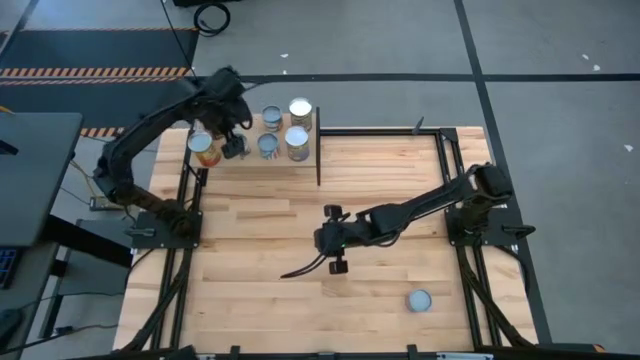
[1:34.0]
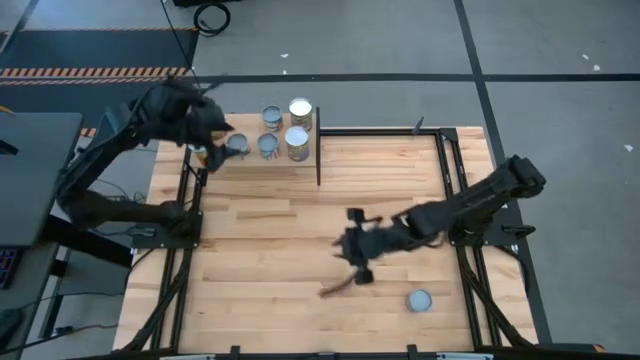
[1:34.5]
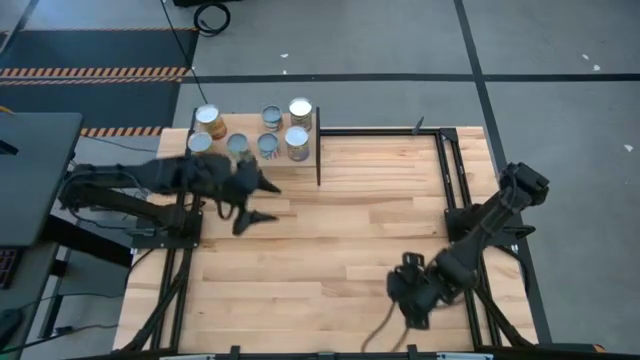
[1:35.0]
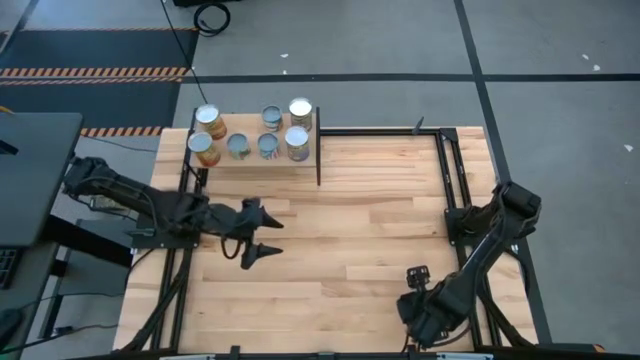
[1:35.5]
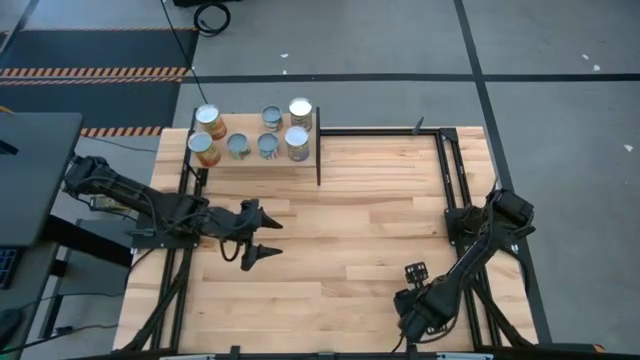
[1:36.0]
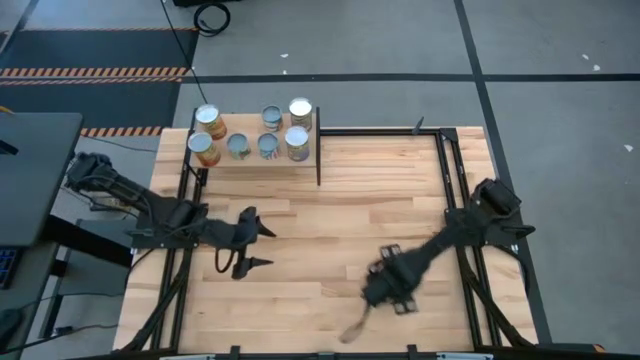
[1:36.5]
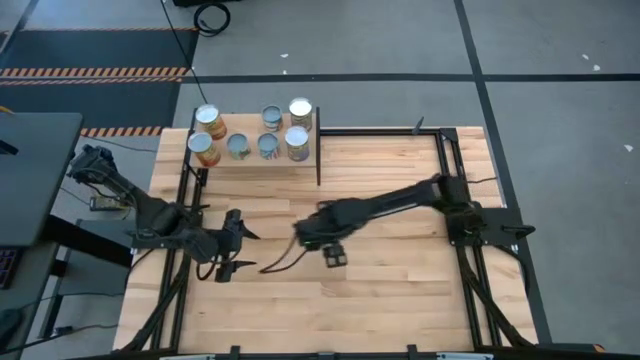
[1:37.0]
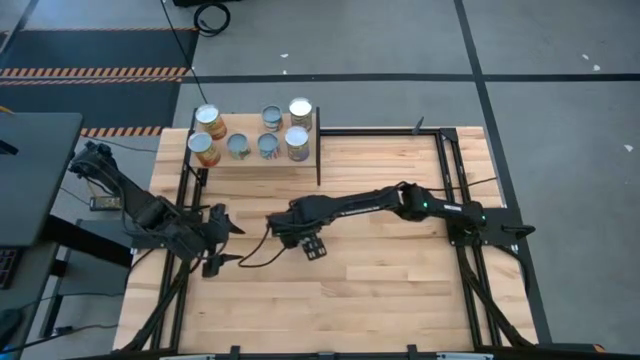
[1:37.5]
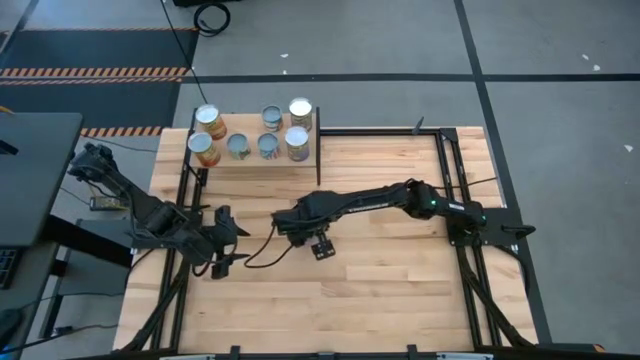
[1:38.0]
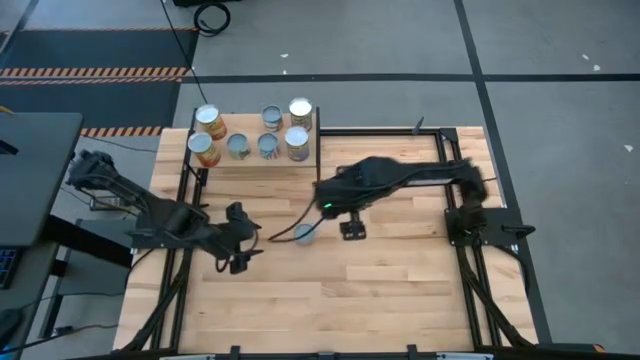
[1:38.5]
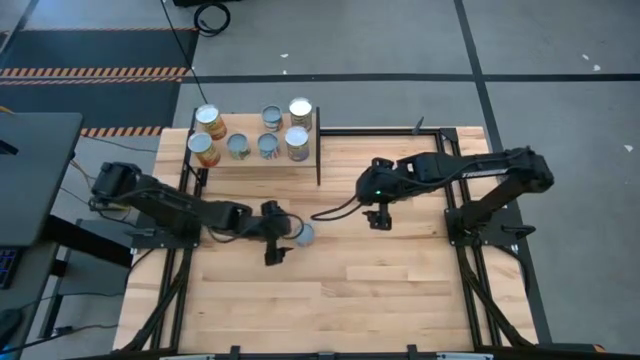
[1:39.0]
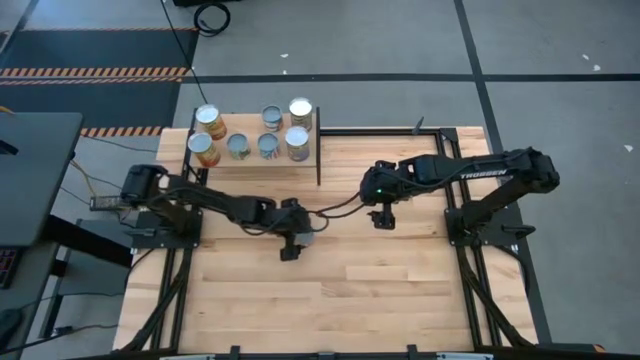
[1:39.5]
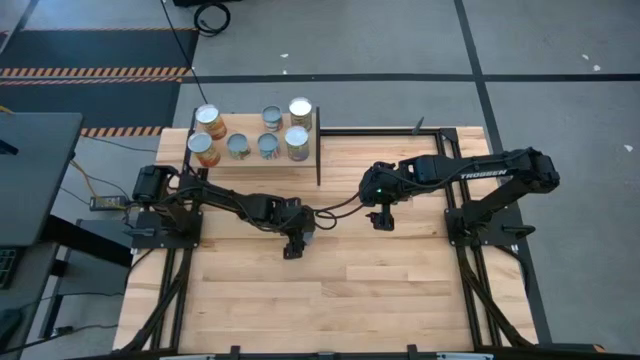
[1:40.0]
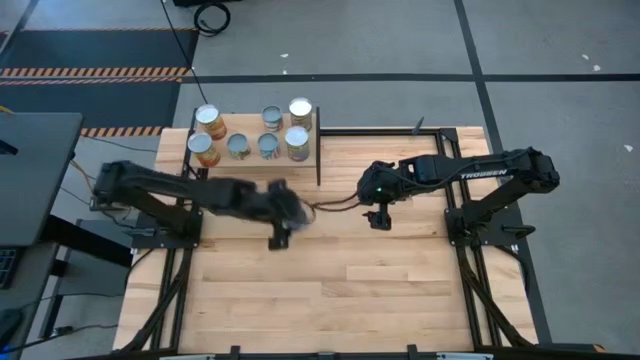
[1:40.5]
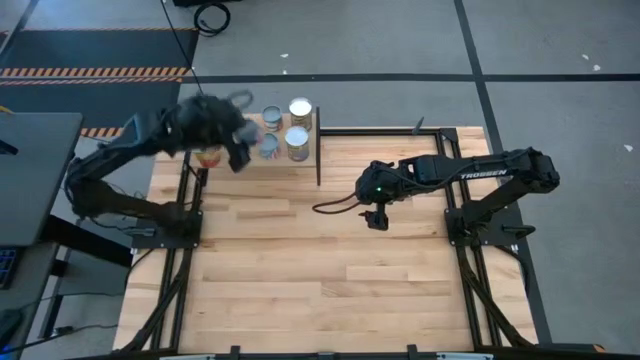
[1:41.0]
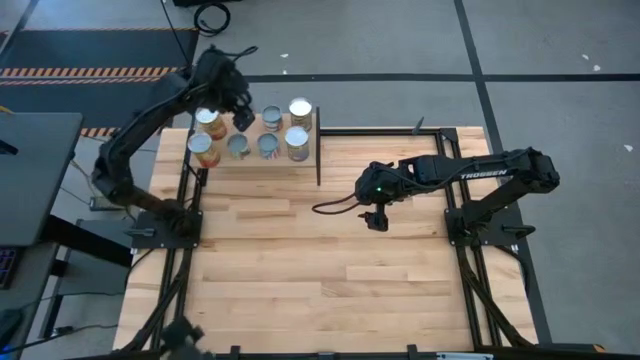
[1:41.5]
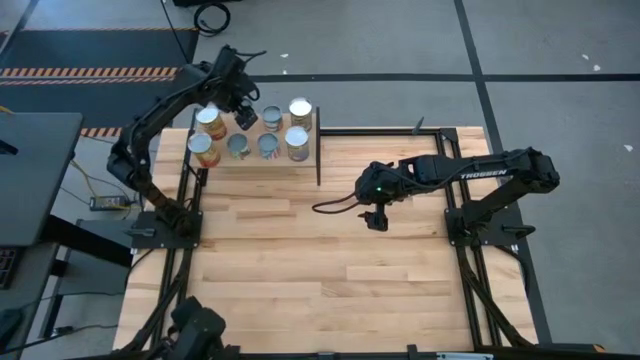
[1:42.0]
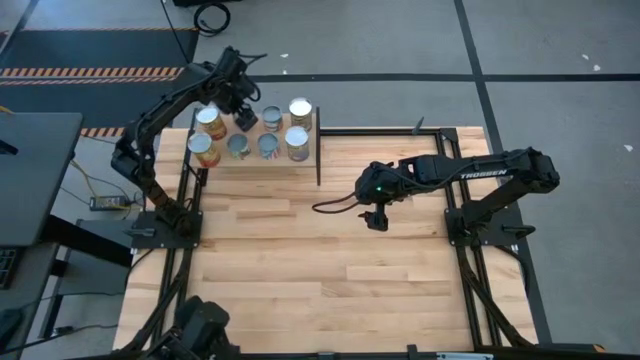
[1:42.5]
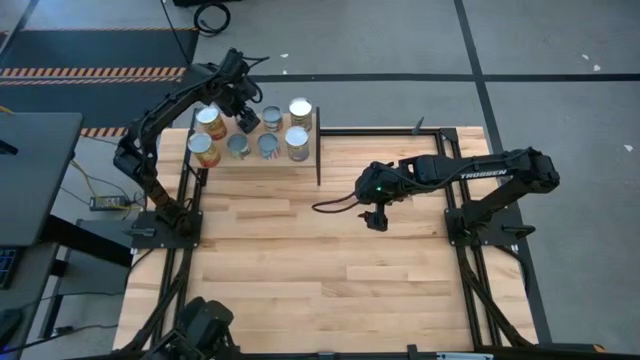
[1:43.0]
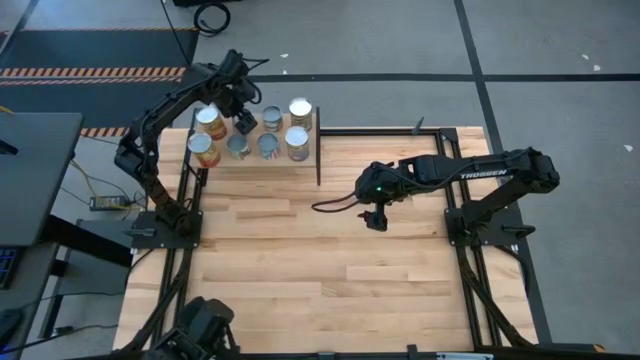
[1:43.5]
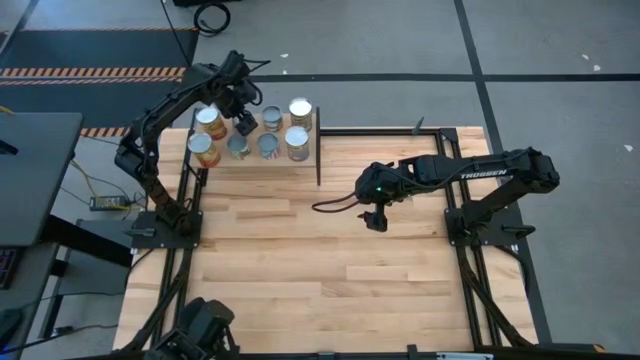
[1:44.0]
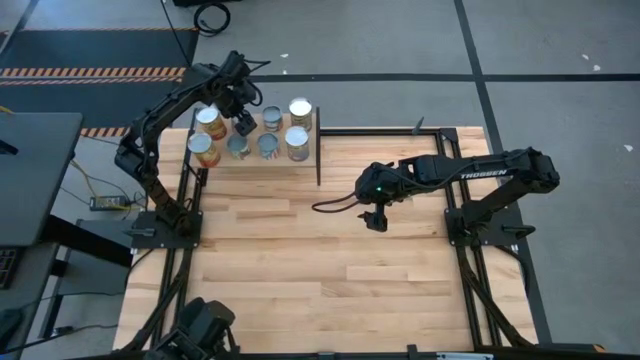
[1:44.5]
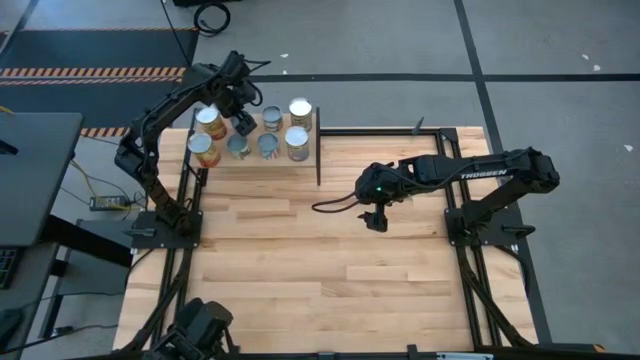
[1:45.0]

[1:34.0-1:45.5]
Task: Pick and place cans onto a shelf
Put the small canned corn on the shelf

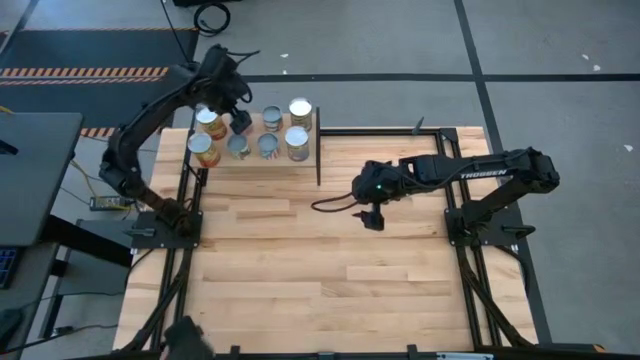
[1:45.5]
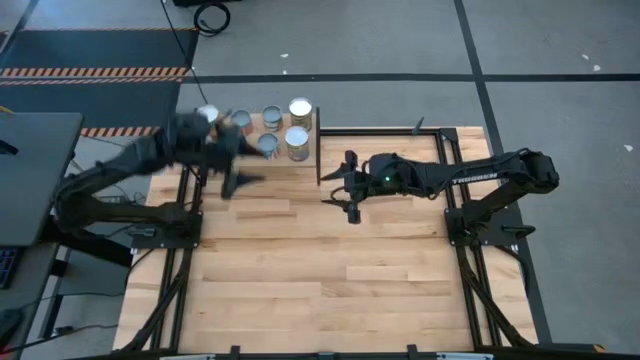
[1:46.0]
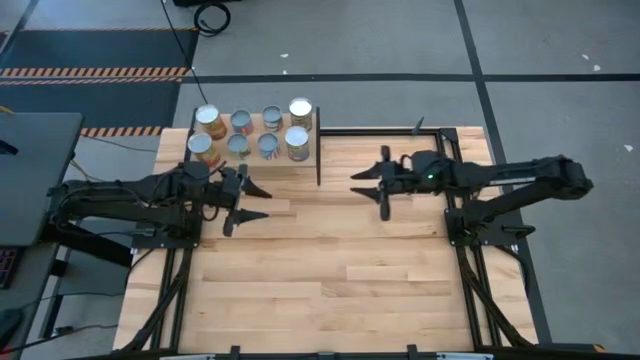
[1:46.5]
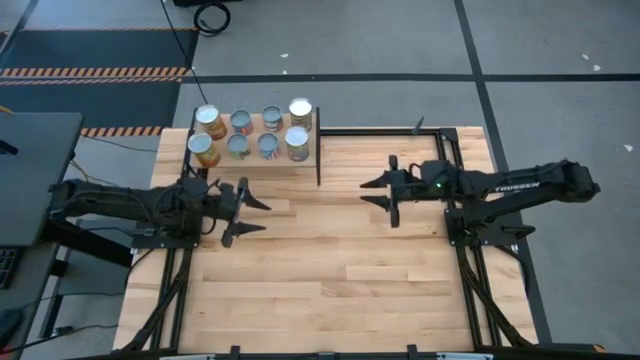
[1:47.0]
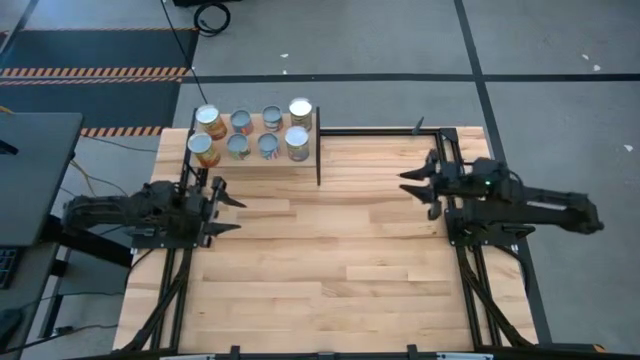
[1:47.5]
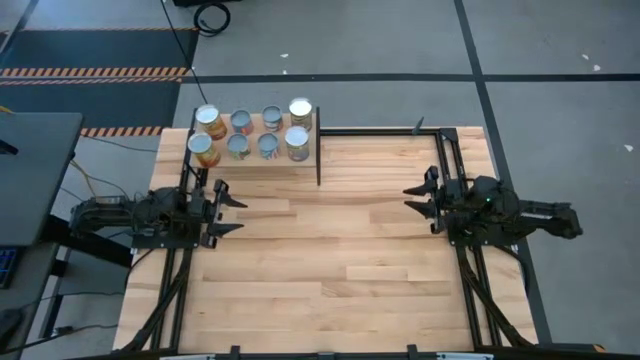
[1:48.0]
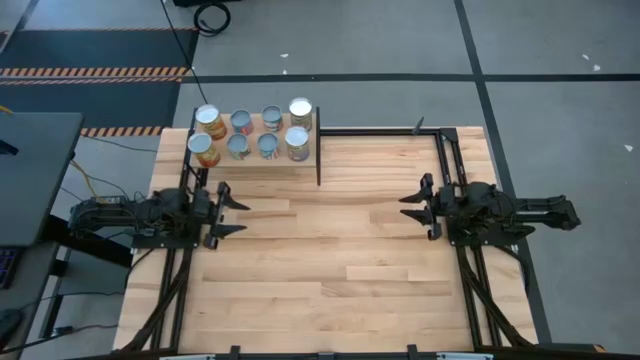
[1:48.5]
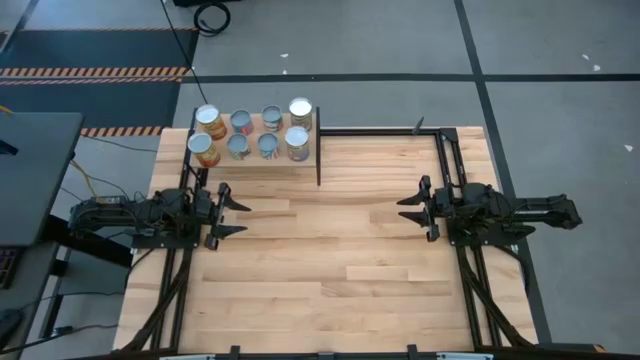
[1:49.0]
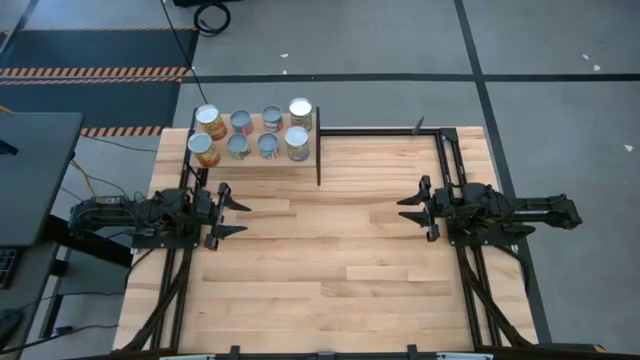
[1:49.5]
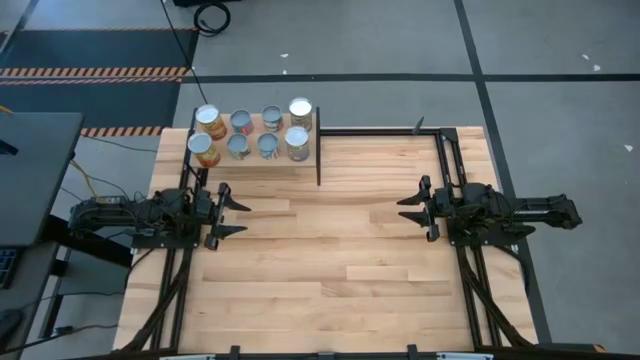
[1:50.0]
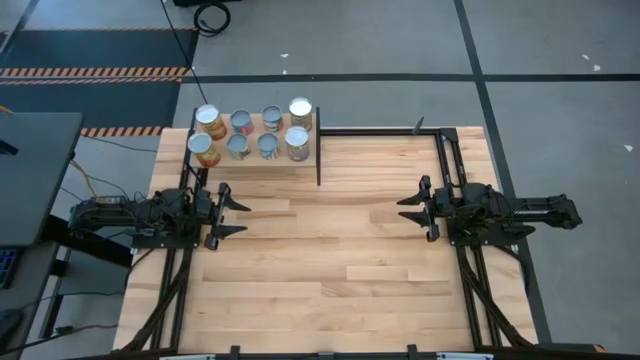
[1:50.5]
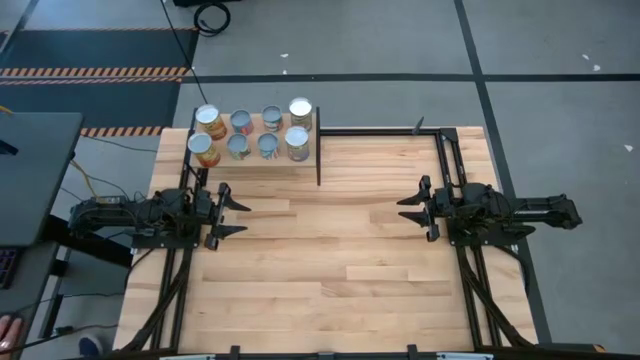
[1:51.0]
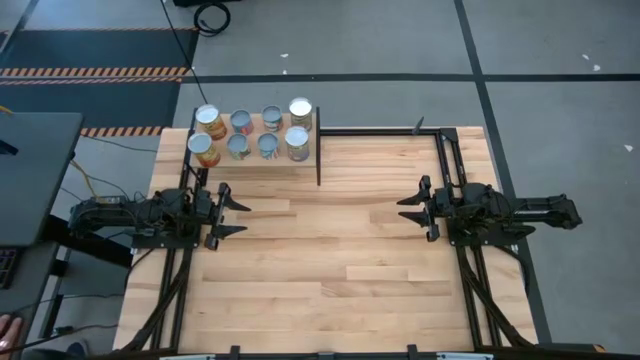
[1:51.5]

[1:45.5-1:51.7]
Return to Home Position

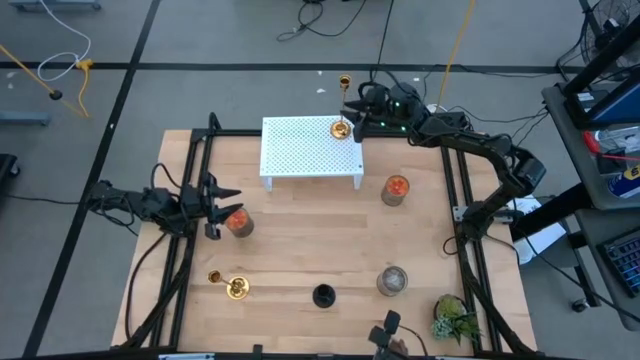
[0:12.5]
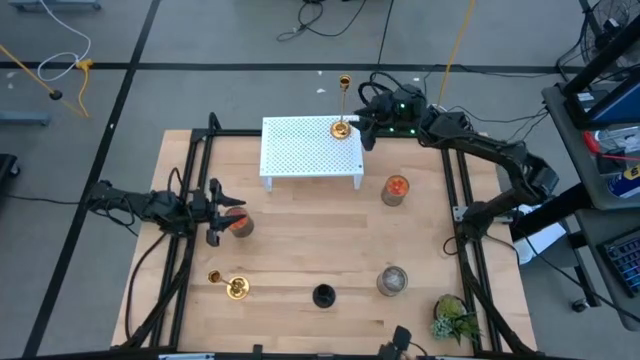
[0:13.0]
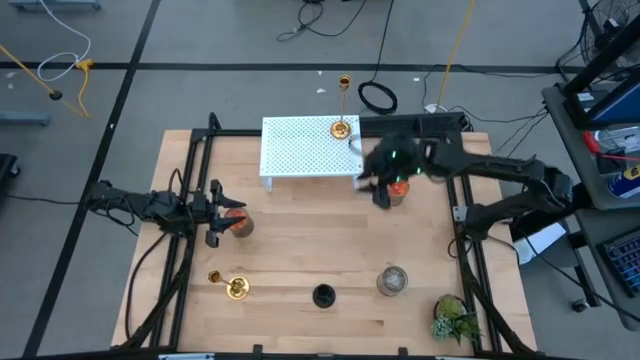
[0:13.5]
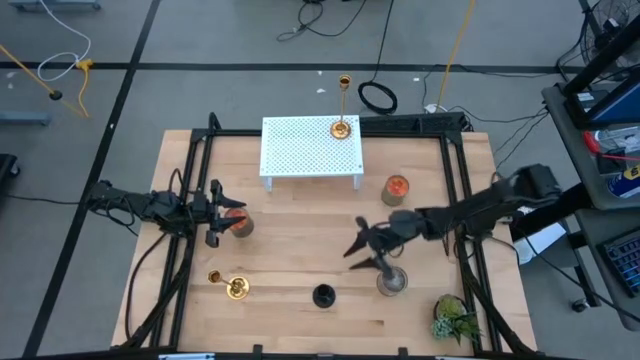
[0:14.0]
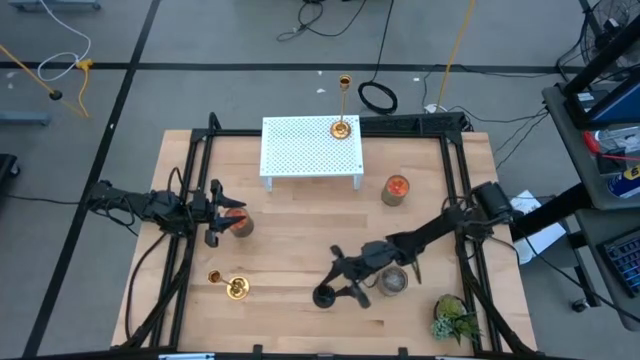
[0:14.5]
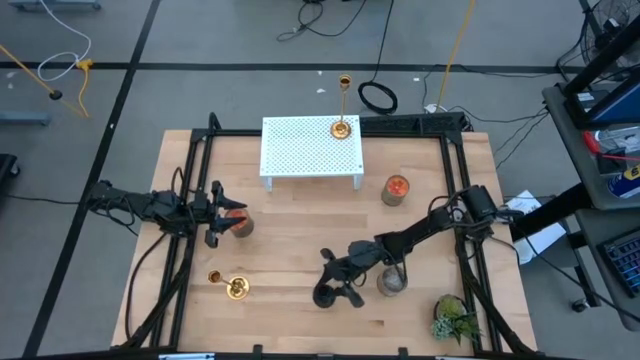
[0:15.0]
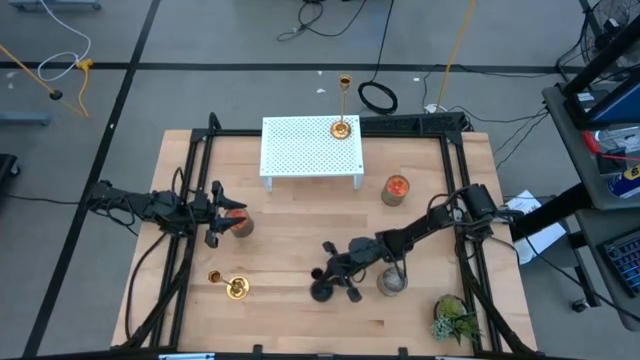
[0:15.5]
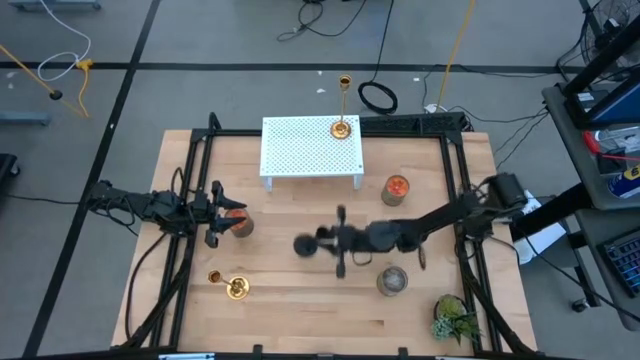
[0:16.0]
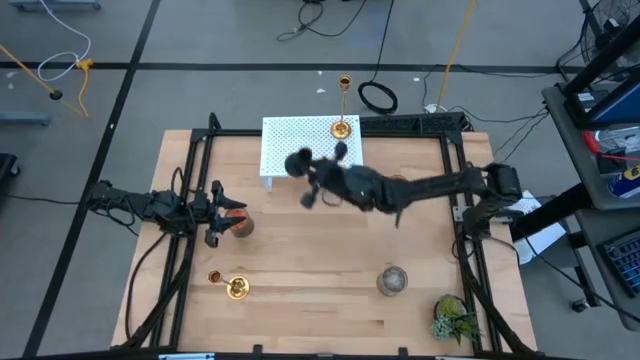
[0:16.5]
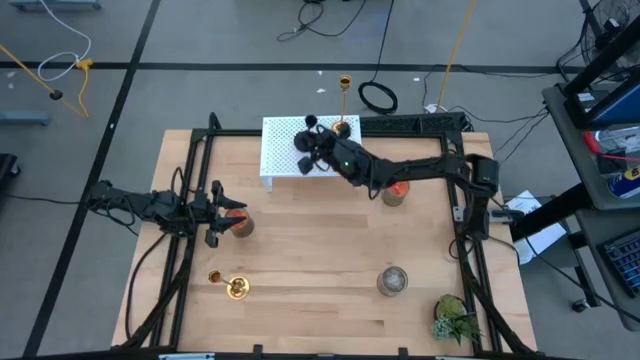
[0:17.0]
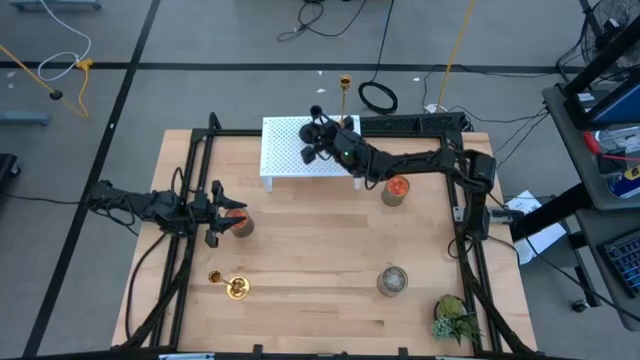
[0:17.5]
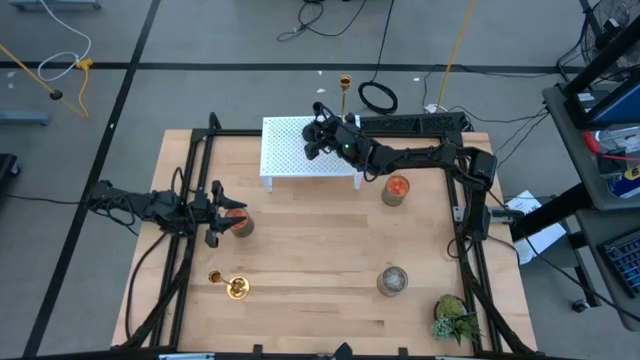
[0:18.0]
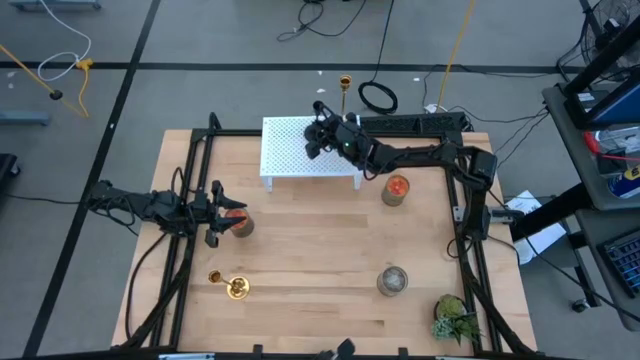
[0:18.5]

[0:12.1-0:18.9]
Task: Pick & Place candle stick holders
Put the black candleholder on the shelf
